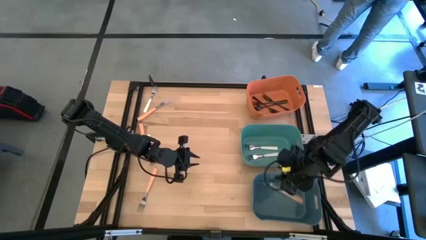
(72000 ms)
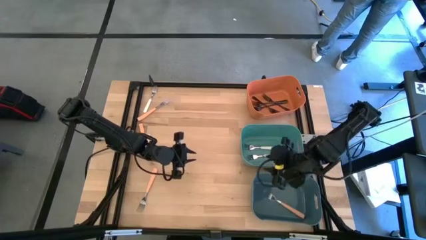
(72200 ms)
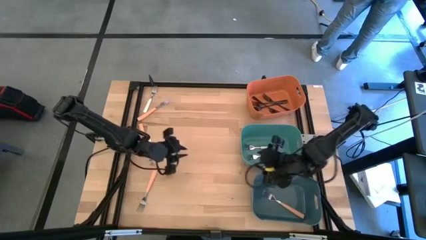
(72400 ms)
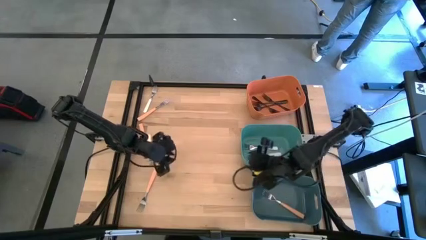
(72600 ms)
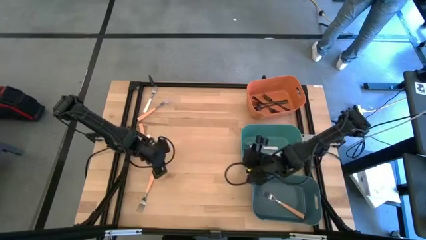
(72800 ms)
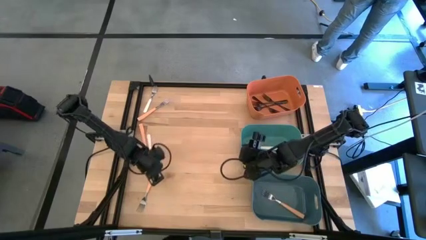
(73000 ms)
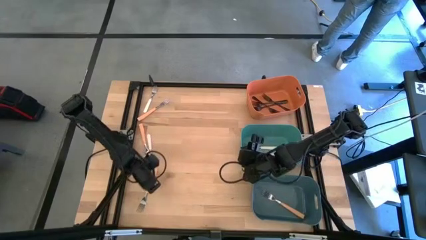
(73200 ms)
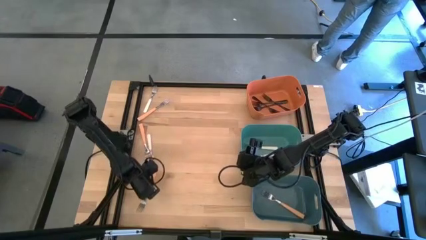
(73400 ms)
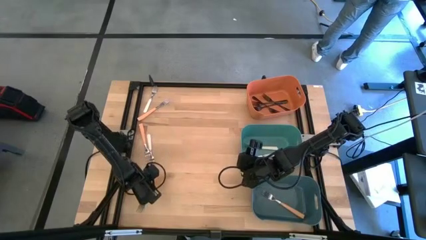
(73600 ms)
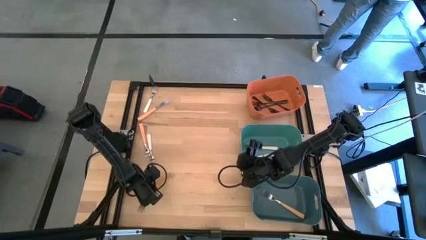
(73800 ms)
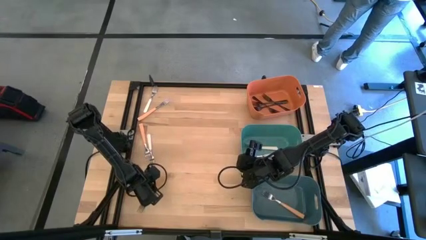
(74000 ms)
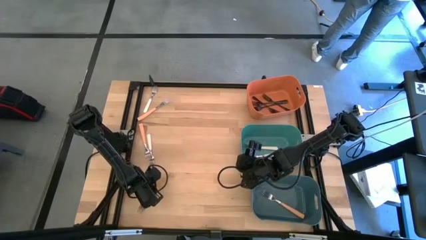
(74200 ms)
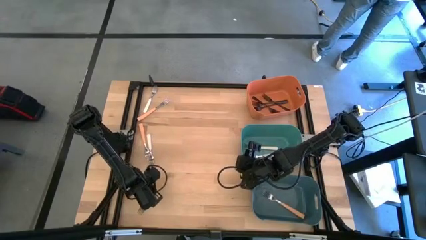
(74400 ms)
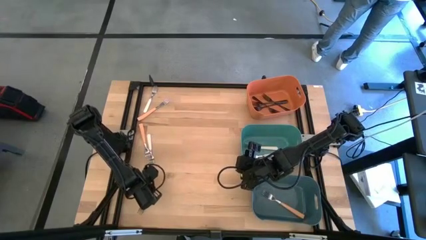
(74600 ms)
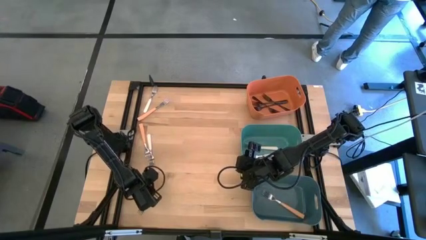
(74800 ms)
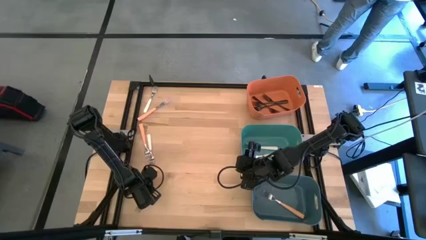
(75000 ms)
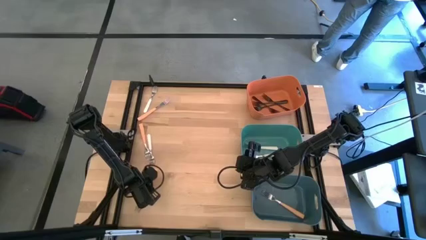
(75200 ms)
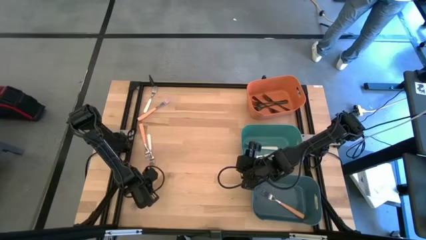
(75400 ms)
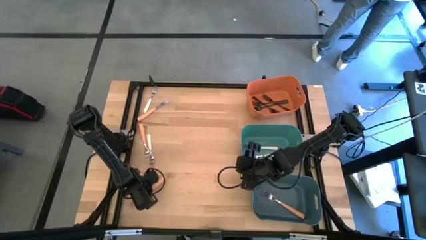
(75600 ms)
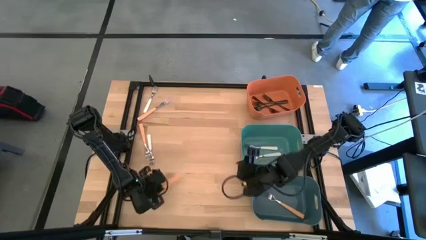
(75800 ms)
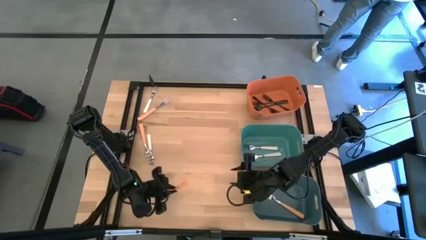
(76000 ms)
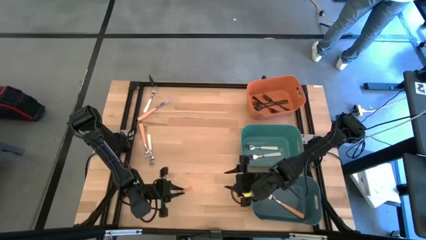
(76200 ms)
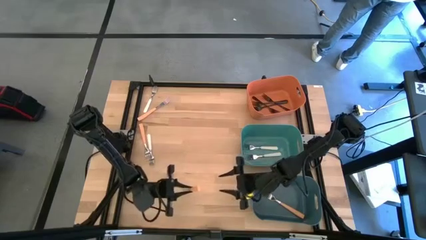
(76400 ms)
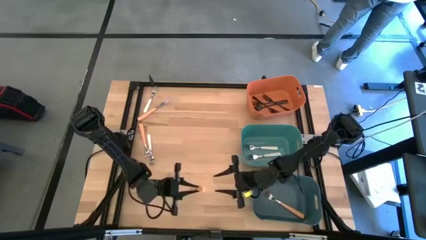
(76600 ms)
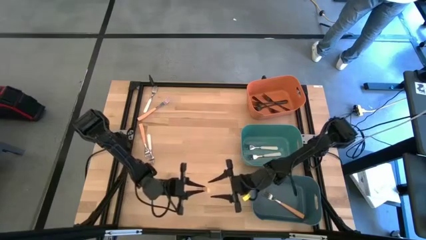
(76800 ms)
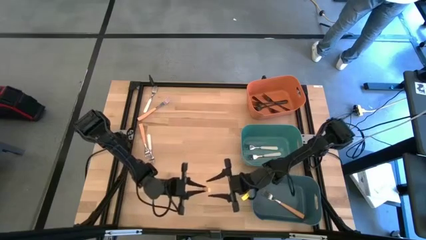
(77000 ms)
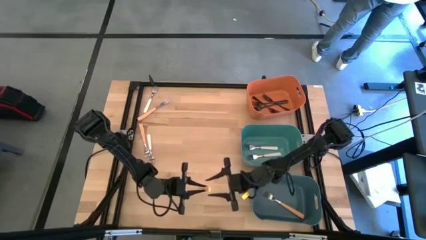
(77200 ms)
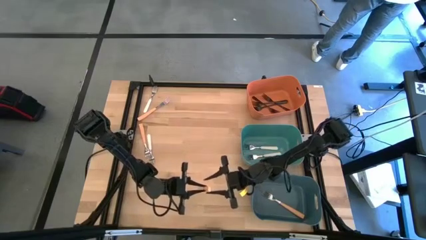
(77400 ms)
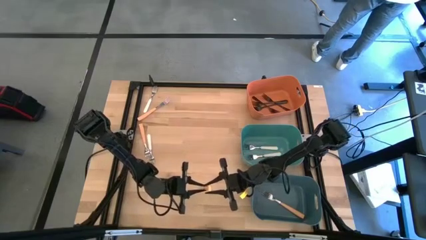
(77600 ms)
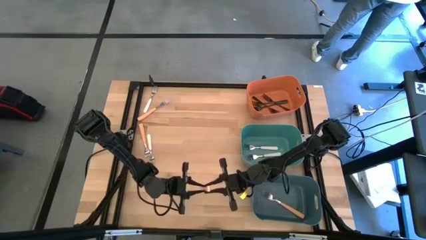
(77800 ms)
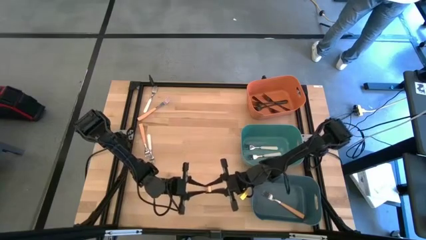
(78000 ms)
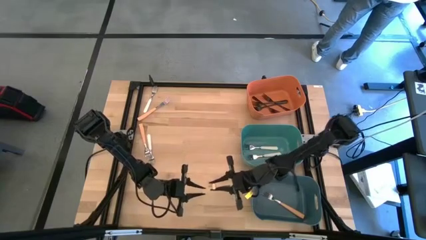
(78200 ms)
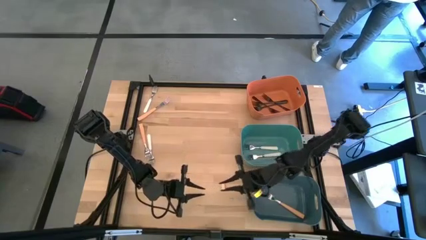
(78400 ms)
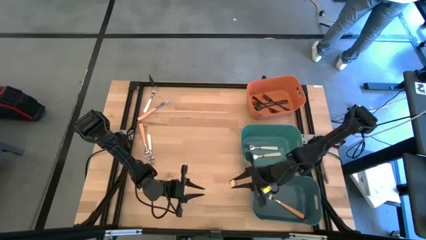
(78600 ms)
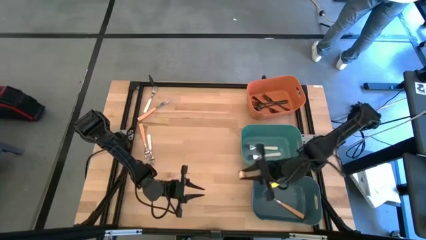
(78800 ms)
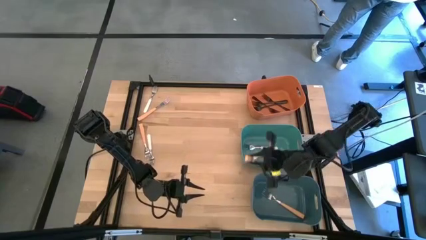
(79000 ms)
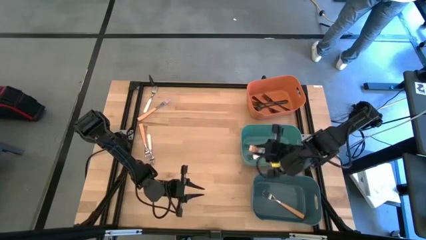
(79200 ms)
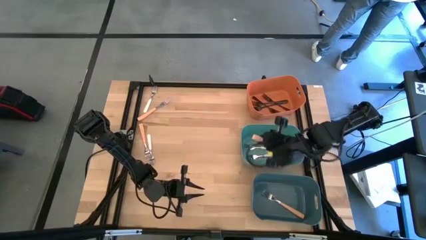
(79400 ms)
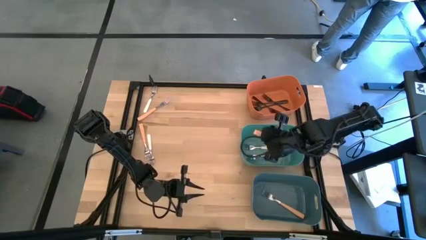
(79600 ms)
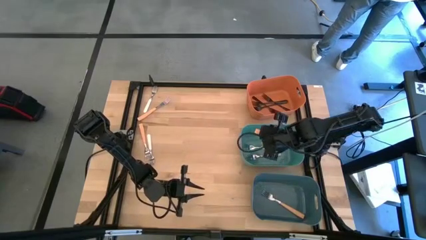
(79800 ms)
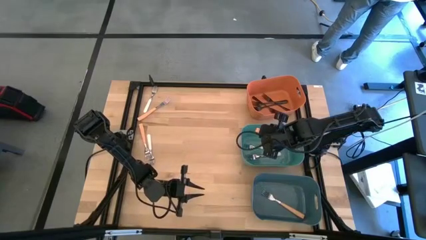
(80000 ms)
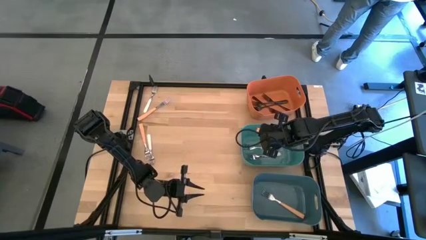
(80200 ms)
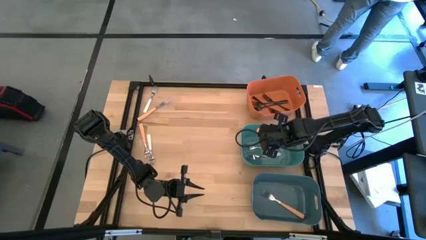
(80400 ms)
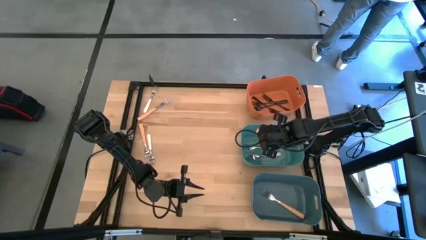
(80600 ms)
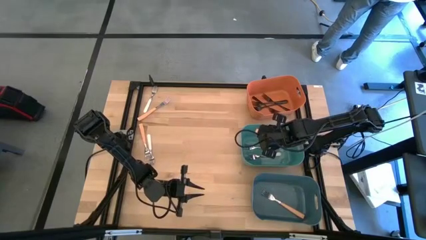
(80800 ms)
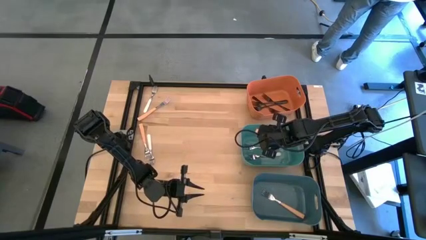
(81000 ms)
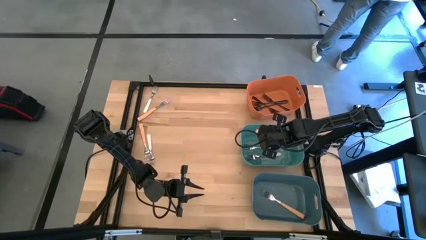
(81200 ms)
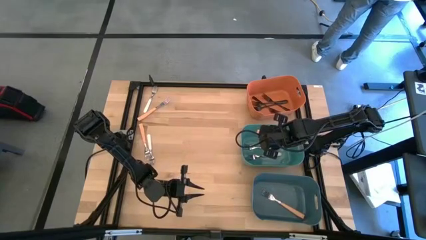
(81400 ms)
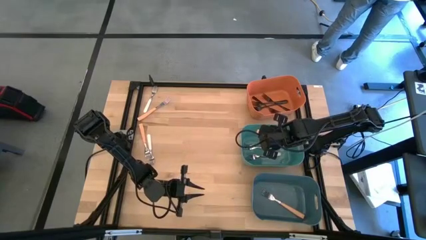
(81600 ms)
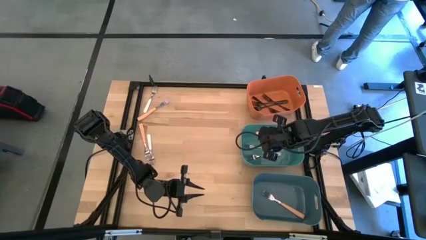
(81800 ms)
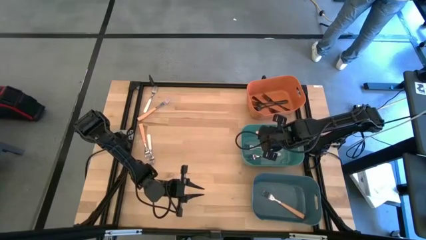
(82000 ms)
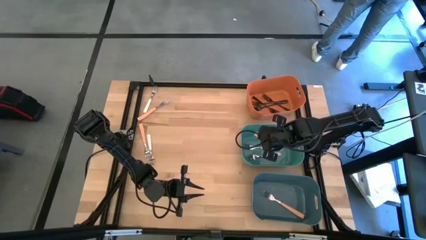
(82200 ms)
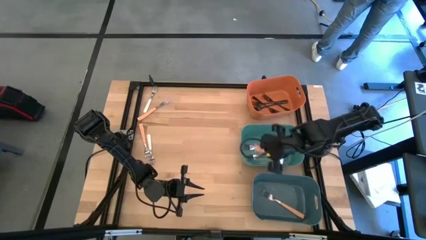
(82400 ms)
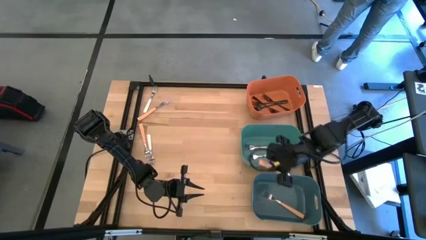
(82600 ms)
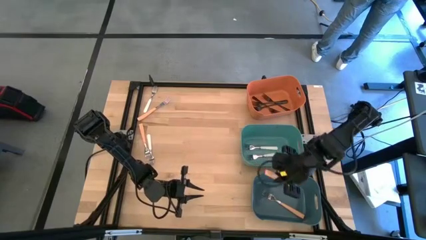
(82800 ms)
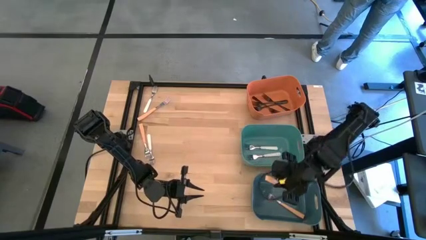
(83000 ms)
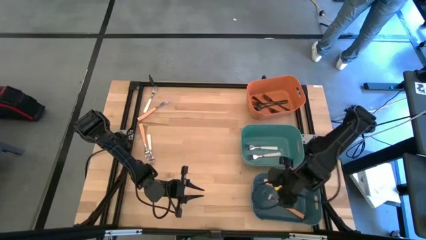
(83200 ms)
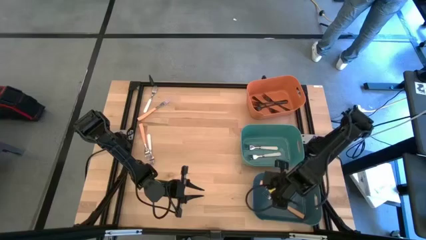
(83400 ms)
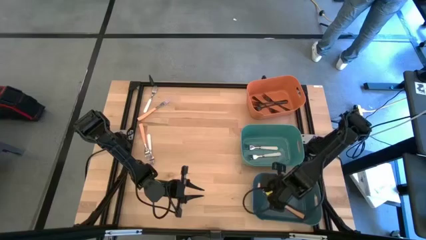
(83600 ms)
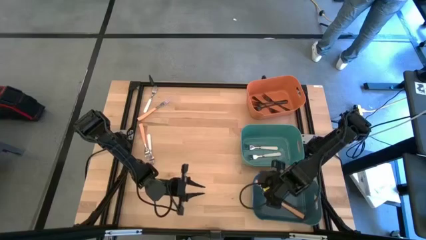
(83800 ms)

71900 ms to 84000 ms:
Task: Sort silverware by color (type)
Put the orange fork into the dark blue bin

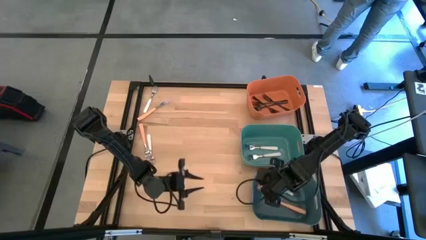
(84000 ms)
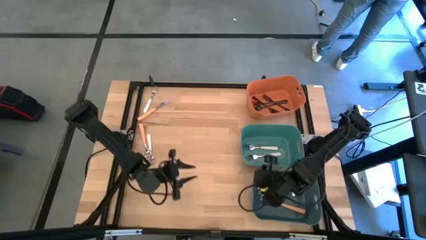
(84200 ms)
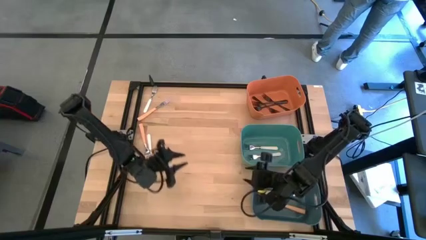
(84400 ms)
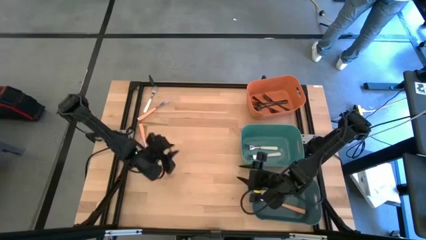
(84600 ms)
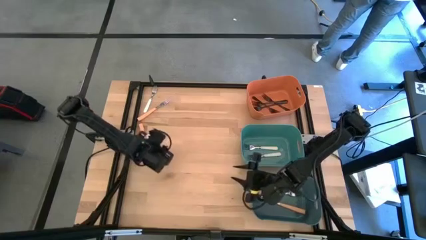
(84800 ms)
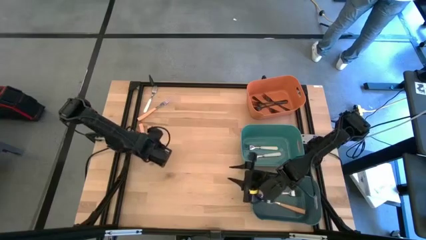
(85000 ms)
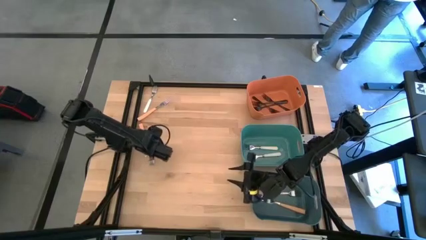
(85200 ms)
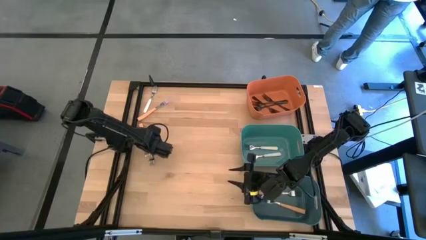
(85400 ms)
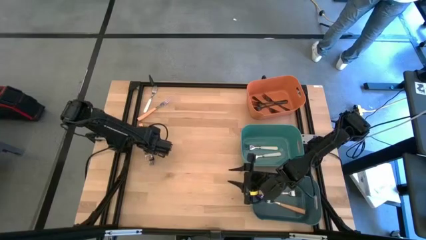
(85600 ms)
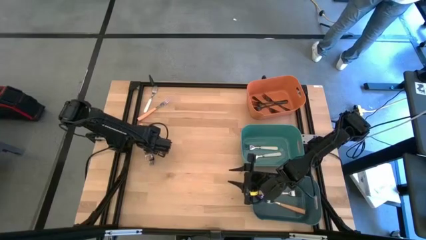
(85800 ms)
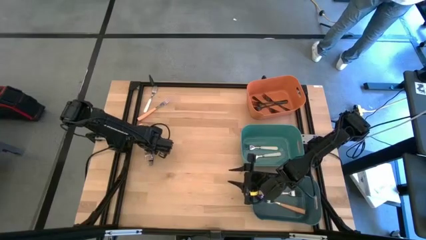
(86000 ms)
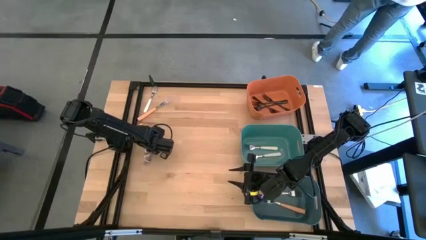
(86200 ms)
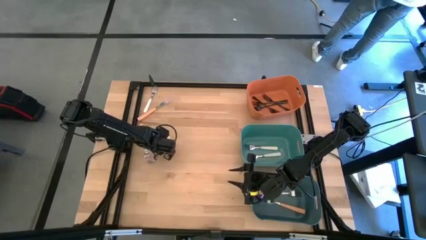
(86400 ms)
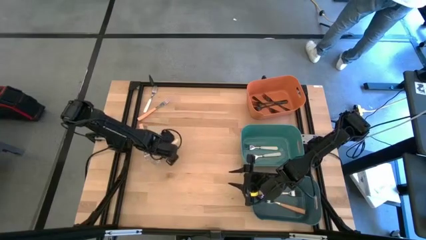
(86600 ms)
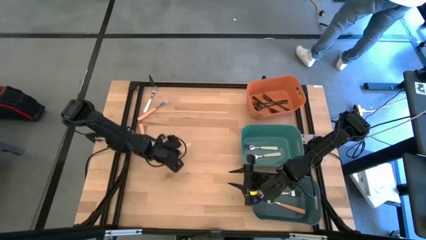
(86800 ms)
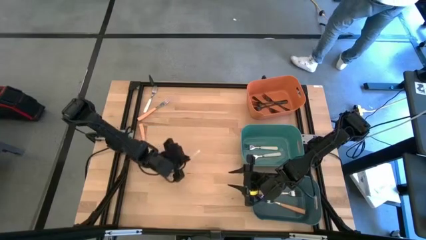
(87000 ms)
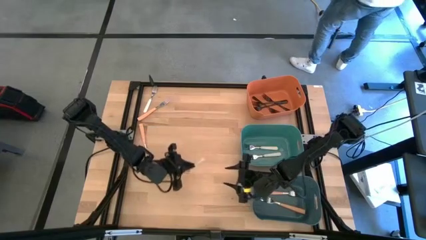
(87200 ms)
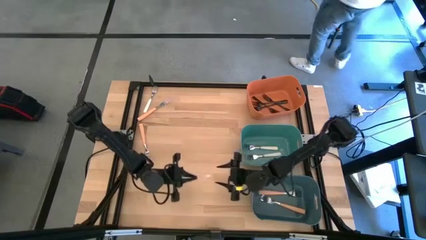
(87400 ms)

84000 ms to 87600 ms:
Put the white fork into the green bin

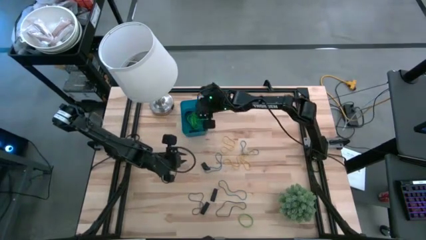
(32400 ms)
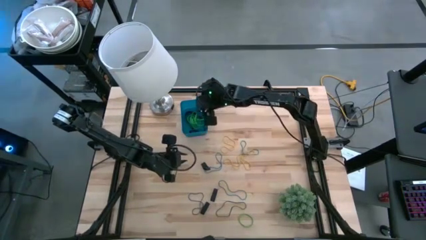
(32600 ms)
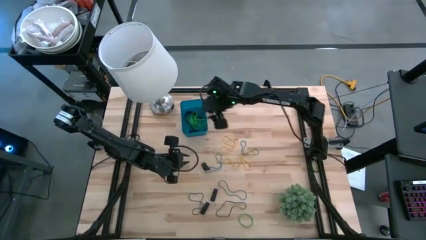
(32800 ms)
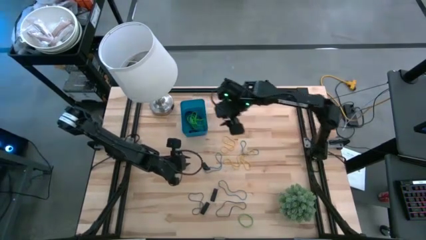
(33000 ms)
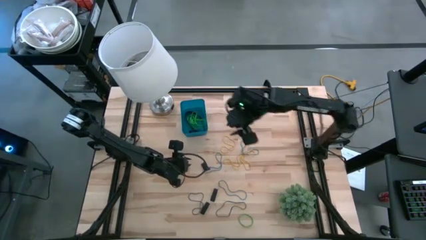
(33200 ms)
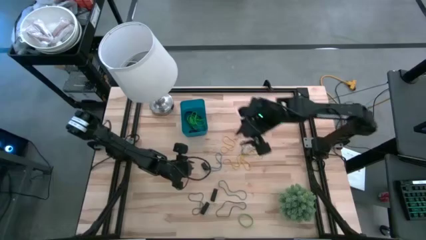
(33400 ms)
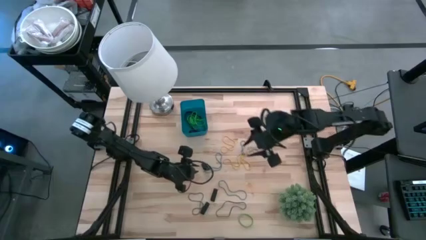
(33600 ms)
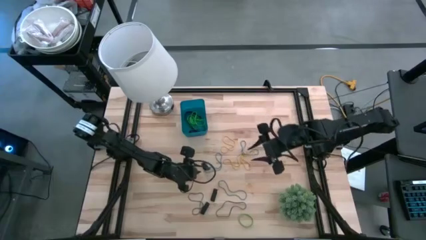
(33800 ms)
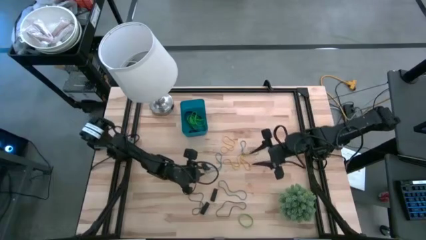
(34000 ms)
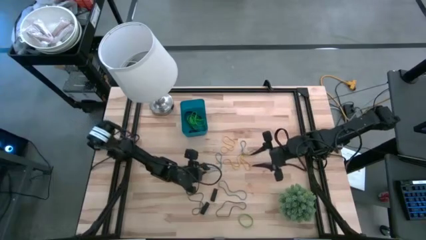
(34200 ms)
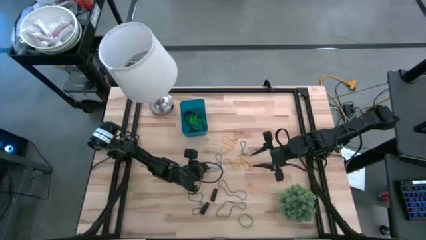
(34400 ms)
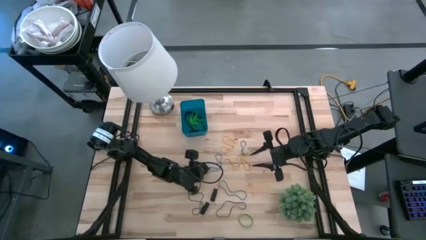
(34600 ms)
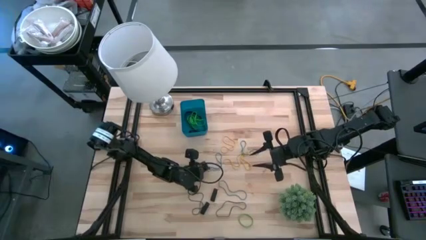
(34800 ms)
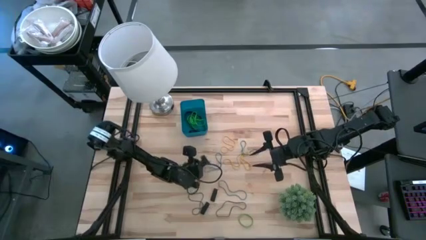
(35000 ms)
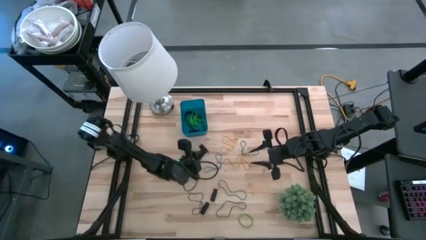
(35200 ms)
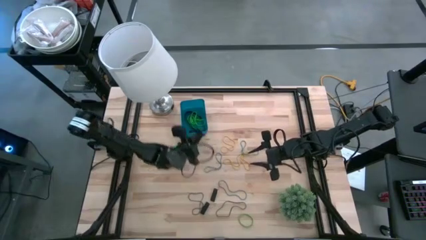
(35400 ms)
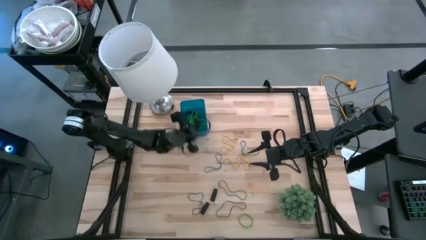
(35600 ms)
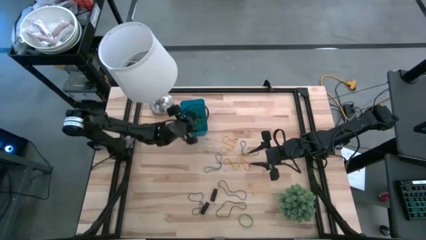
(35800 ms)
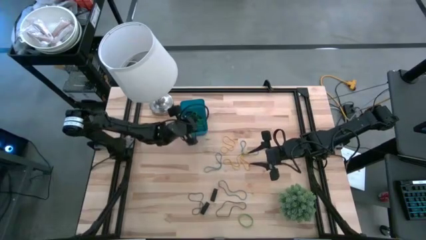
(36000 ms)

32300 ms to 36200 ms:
Task: Pick and place rubber bands into bin
Put the top black rubber band into the blue bin
